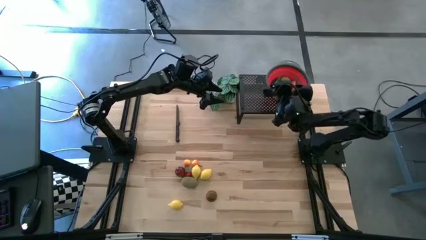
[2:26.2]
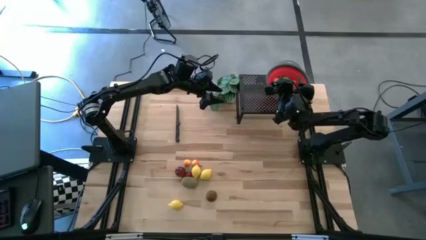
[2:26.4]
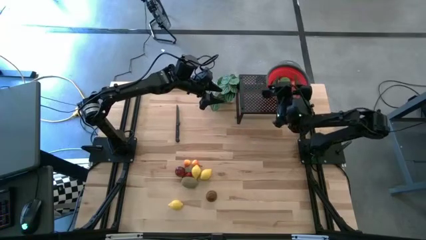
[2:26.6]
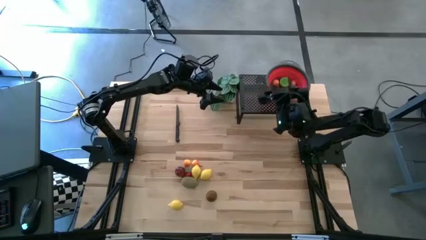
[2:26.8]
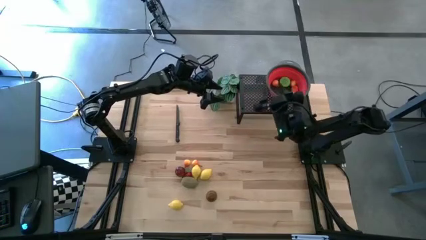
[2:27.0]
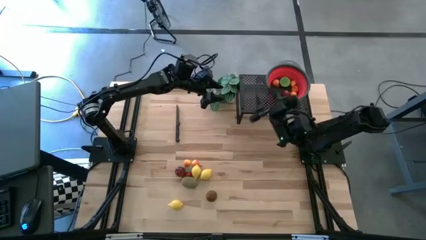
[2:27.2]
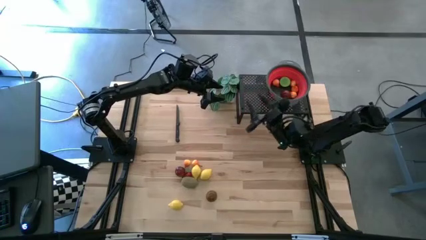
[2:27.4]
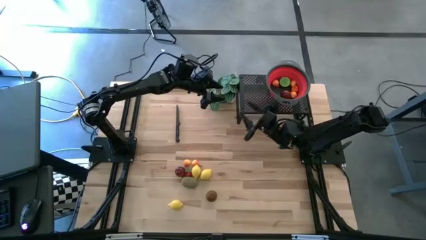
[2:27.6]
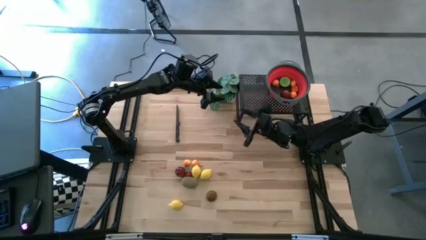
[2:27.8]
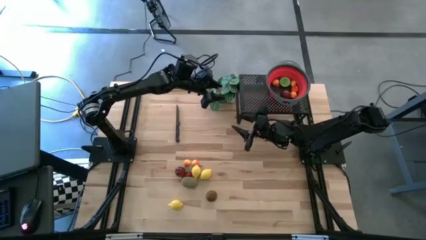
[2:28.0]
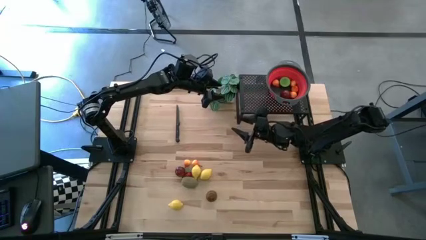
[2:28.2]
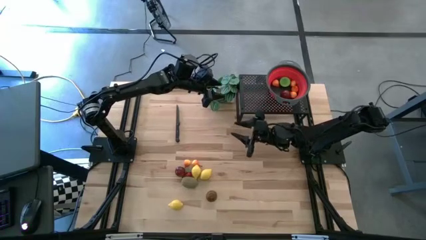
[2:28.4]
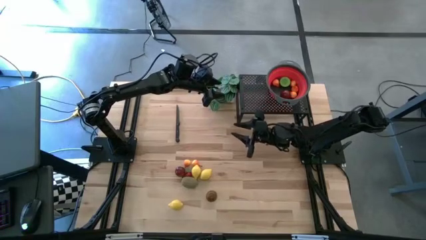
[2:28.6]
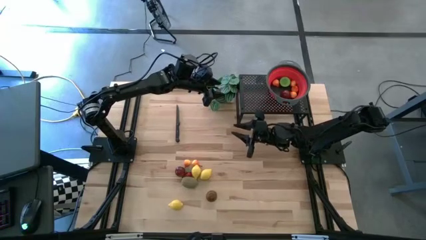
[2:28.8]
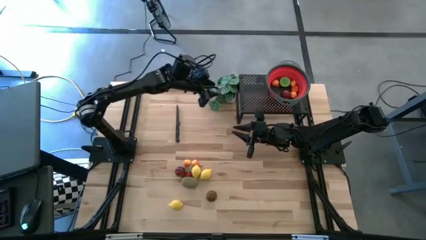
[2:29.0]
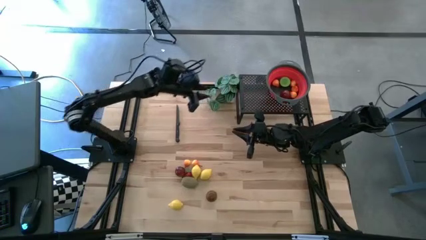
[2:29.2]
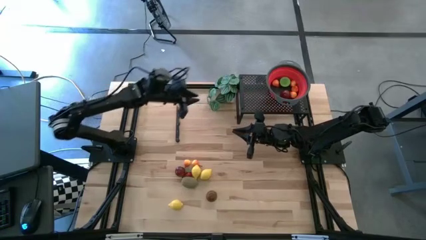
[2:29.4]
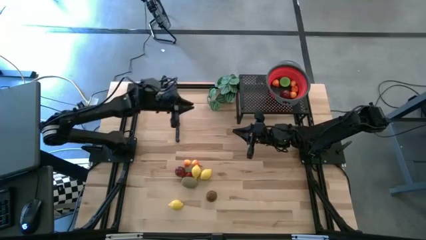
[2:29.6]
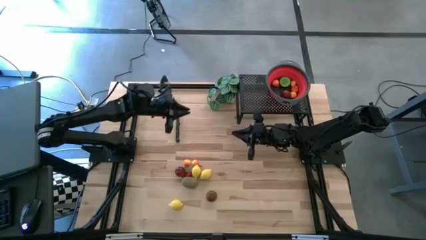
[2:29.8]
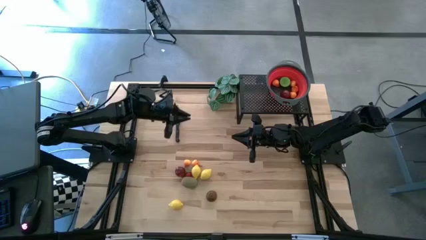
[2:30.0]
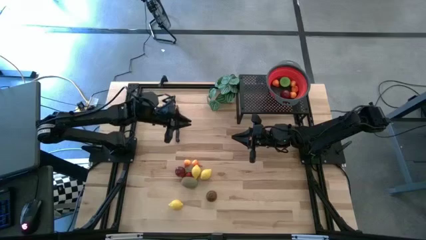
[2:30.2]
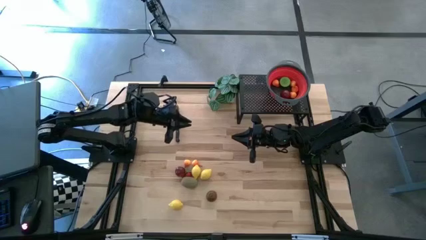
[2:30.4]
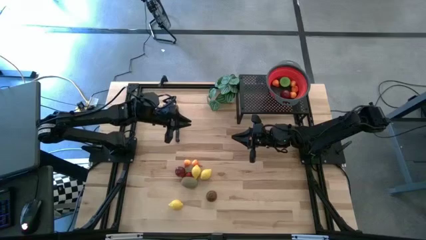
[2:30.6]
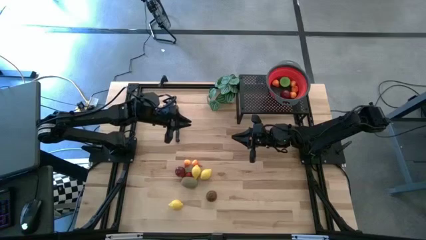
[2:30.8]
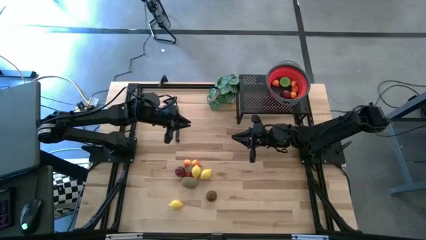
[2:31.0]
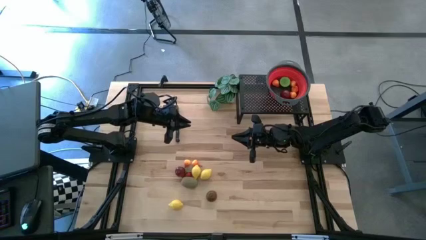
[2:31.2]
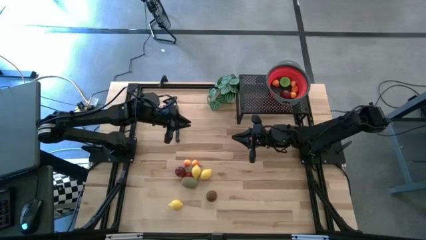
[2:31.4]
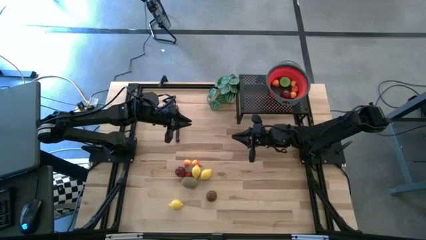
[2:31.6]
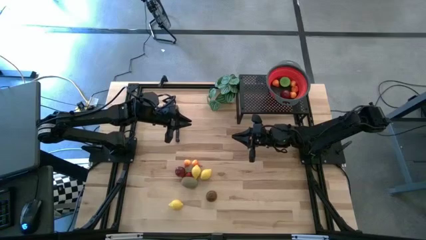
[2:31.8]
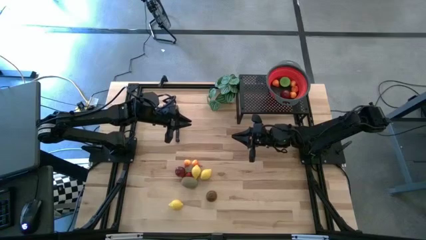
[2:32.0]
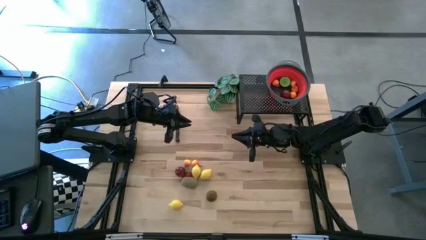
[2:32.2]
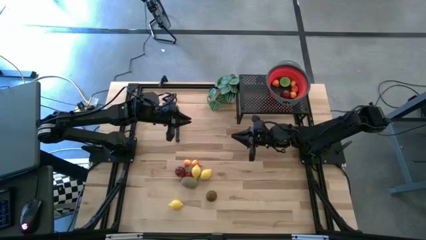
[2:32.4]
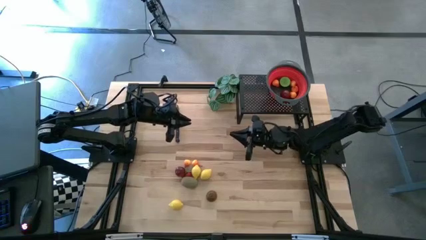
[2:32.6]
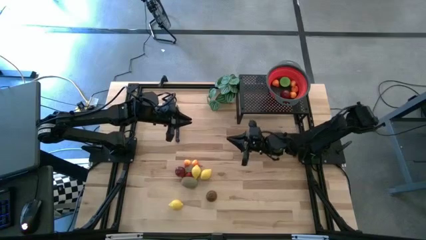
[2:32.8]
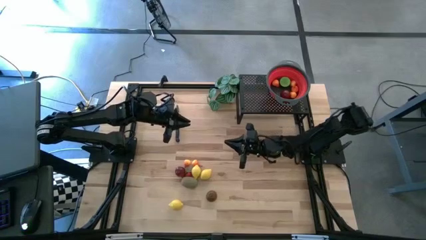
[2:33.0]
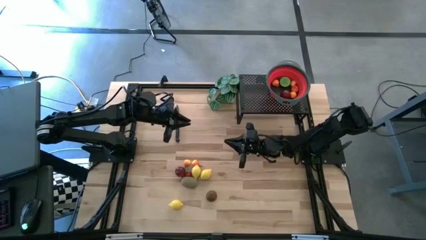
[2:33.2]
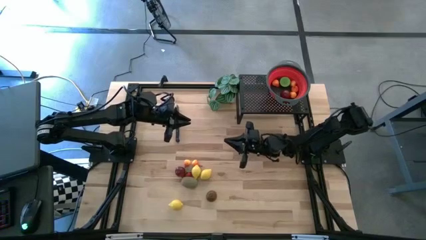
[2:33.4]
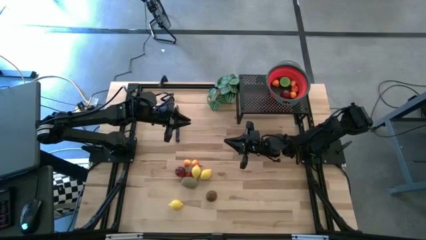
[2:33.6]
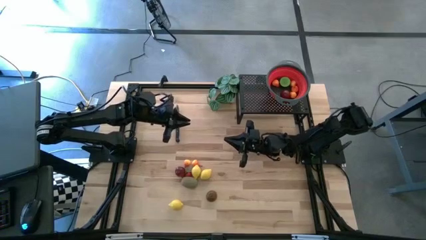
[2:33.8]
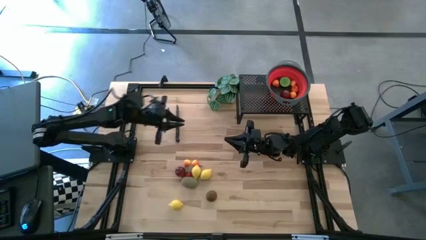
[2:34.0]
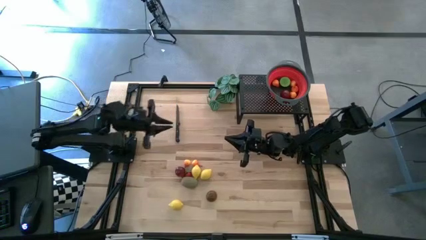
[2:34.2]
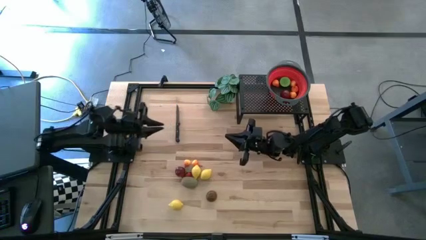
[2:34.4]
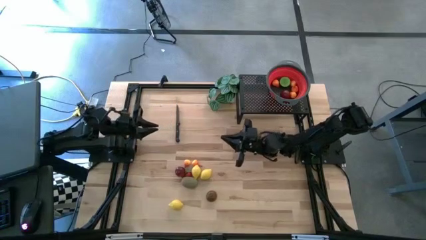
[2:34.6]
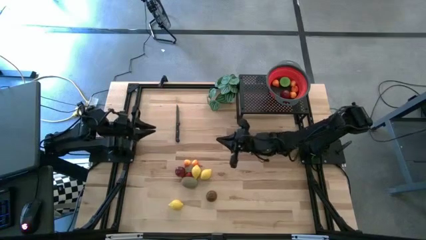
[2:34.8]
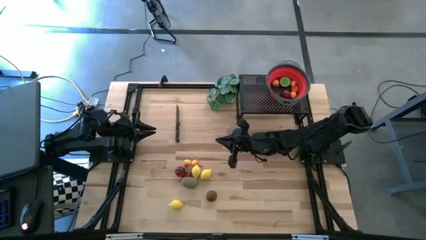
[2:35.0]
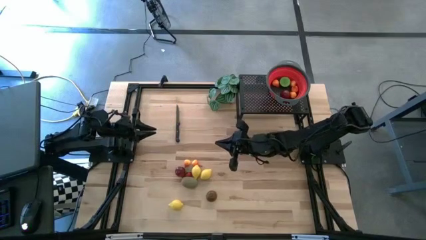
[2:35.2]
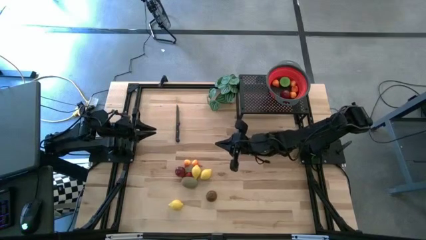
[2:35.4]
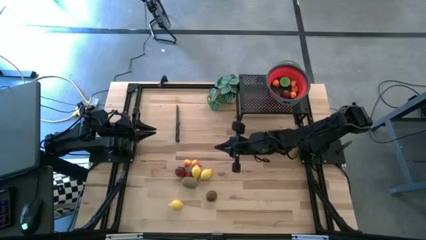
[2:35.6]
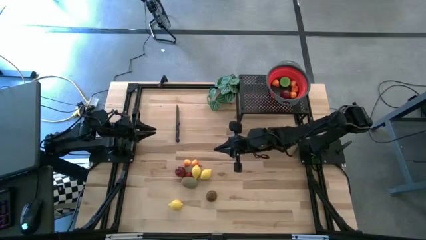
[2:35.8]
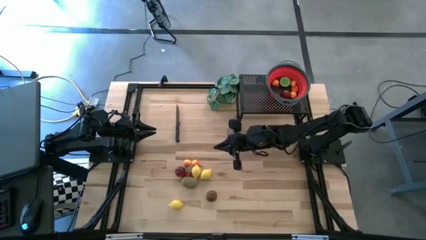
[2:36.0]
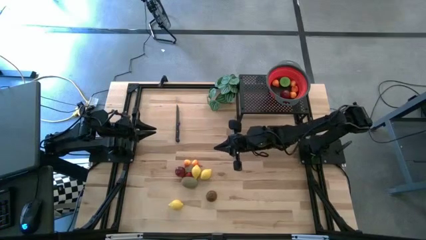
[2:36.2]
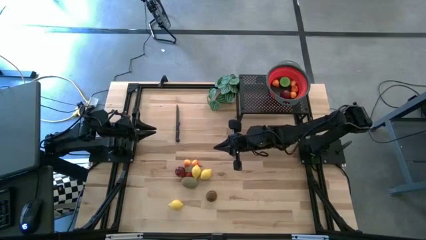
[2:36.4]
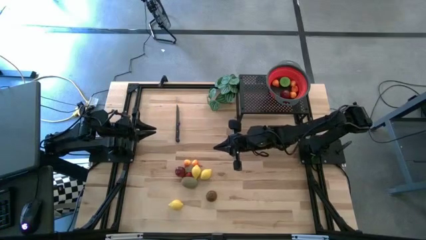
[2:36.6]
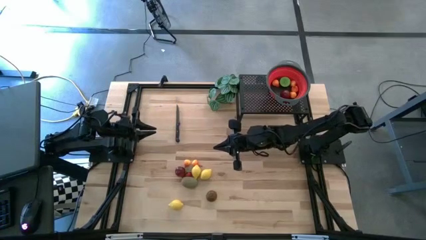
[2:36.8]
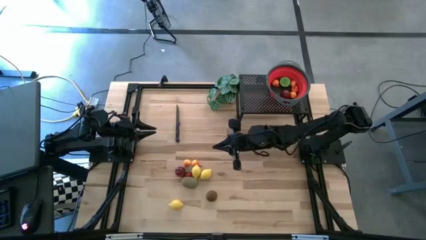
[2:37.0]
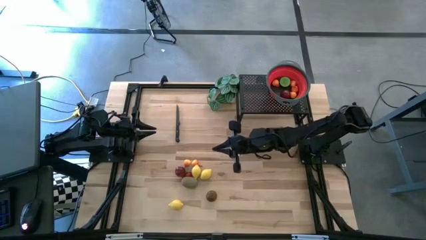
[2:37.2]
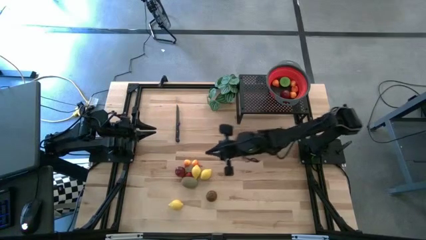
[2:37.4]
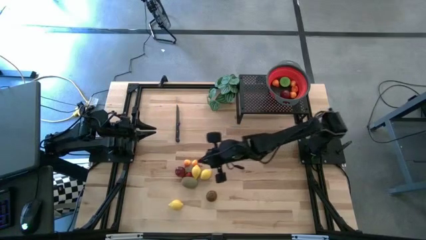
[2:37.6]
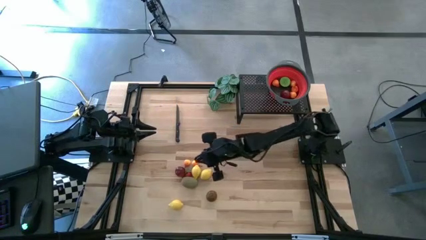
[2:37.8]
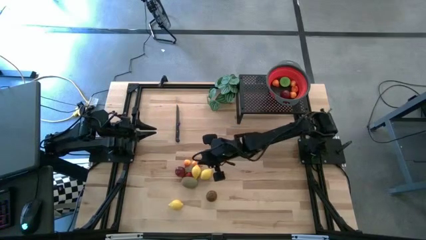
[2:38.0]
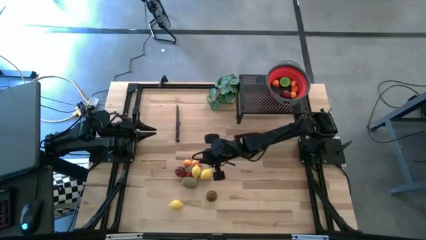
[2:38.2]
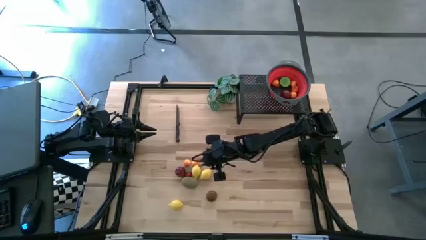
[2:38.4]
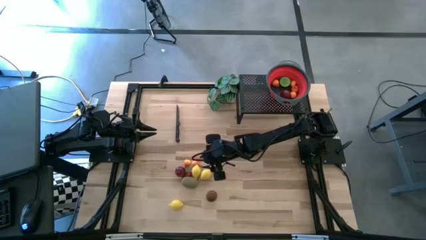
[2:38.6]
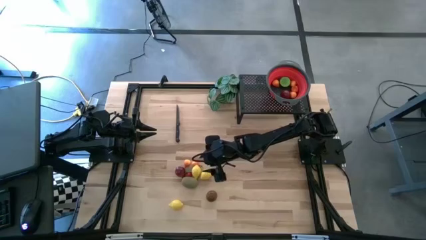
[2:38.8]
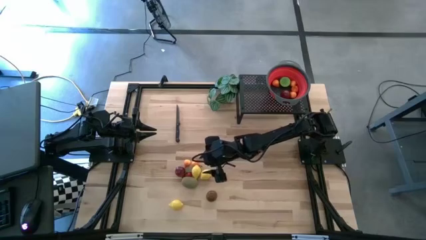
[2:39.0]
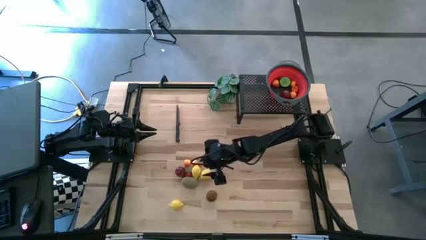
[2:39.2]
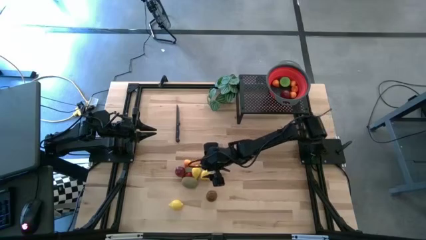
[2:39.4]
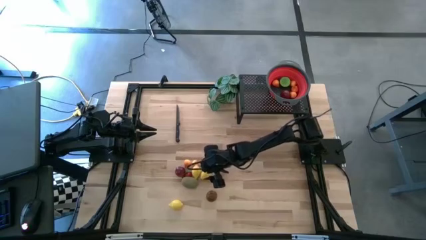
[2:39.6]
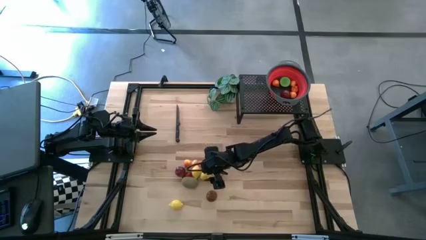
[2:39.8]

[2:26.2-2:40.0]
Task: Pick & Place Fruit
Put the yellow lemon into the red strainer bowl

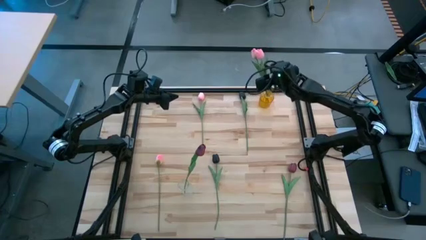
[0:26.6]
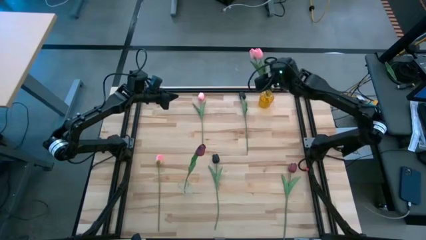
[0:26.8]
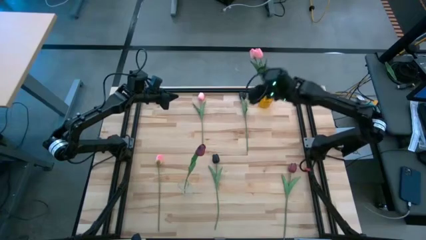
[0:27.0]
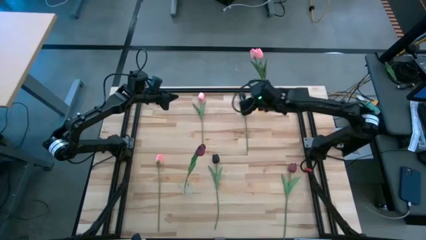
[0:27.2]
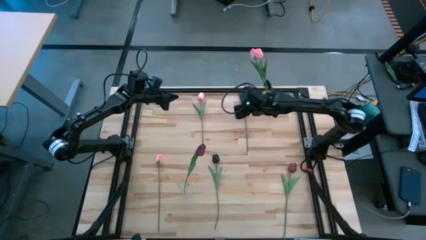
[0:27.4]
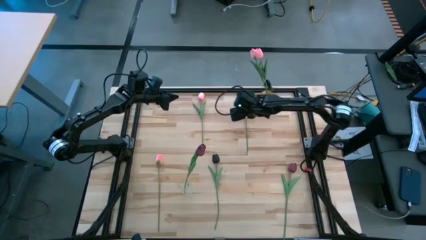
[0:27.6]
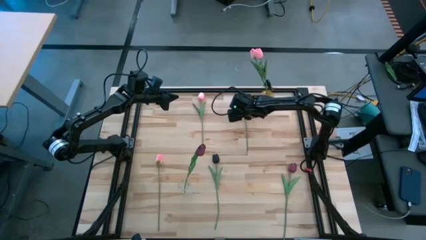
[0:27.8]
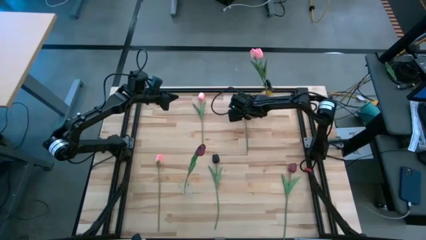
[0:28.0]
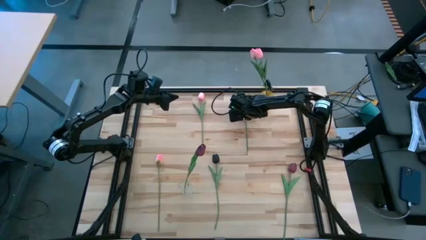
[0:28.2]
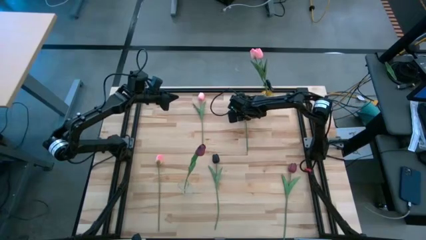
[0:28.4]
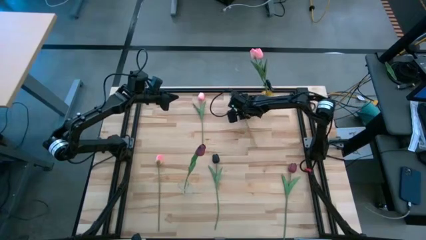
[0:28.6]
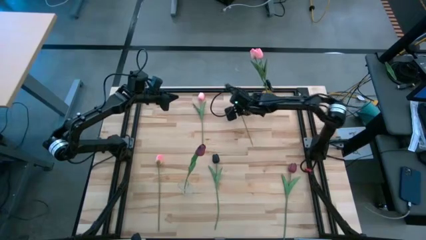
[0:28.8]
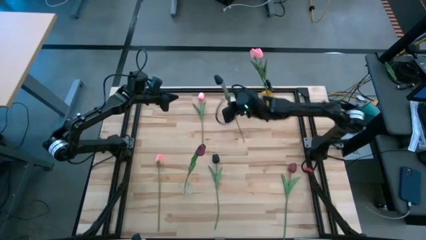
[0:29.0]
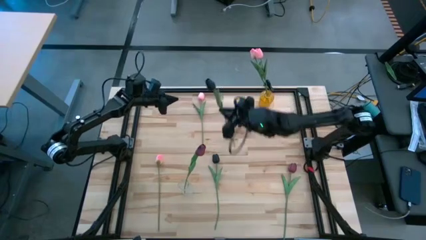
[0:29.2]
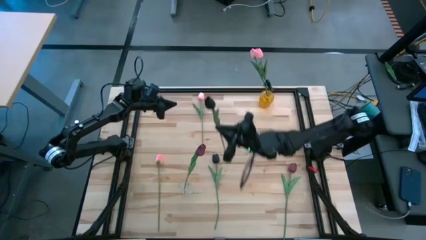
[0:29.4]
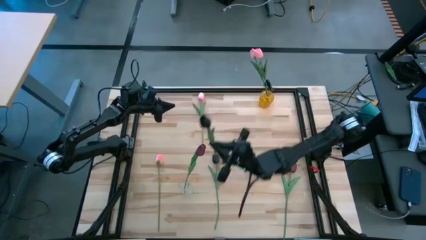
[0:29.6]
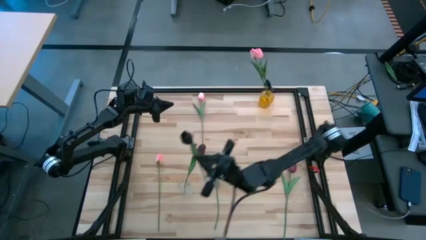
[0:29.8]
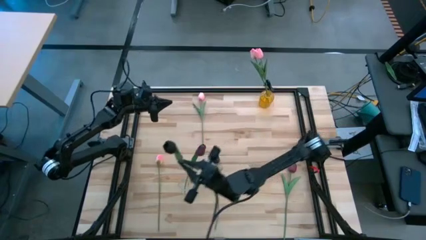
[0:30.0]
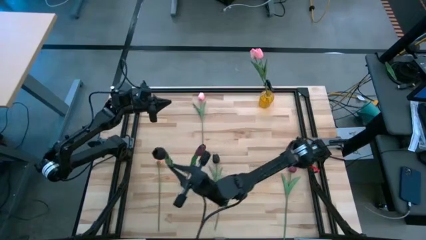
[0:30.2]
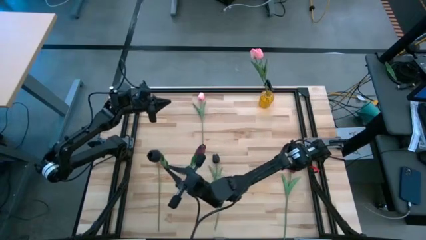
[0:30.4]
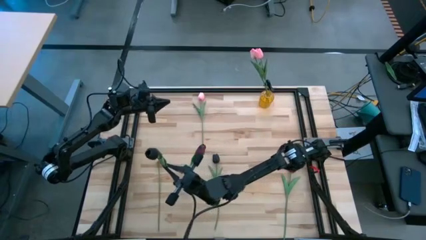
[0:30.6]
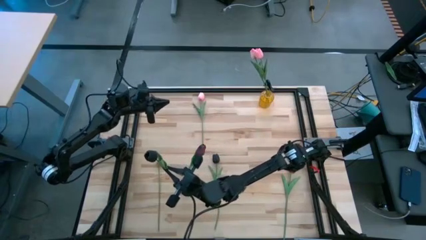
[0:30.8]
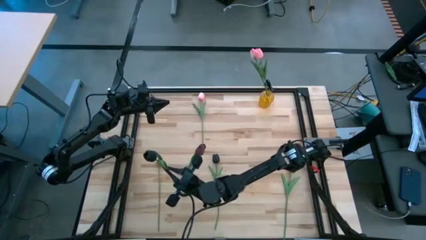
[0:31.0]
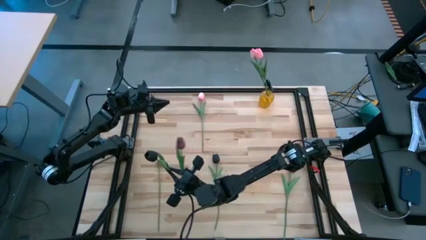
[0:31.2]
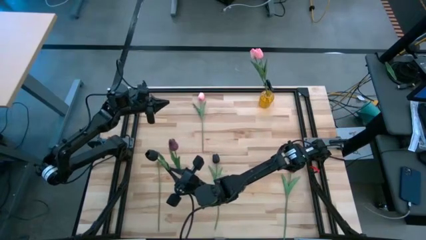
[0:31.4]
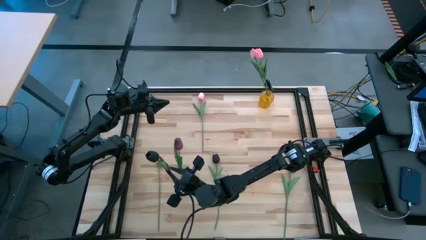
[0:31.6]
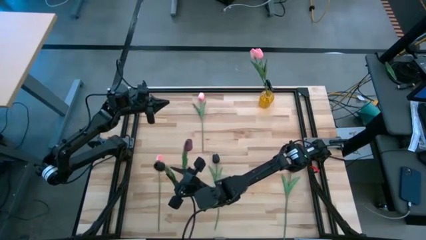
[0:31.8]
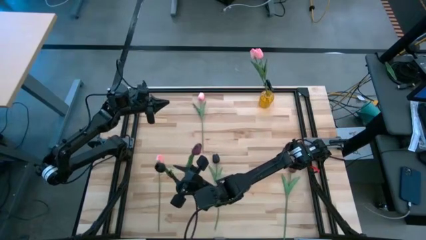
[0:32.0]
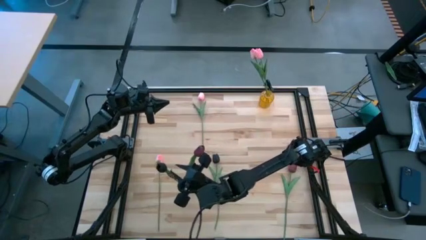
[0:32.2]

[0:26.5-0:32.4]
Task: Sort flowers into vase by color
Put the top black tulip flower into the crystal vase
